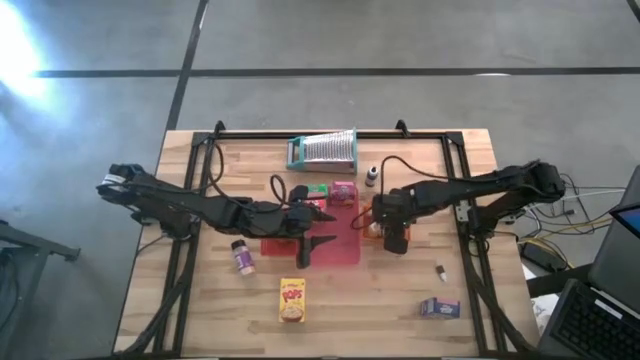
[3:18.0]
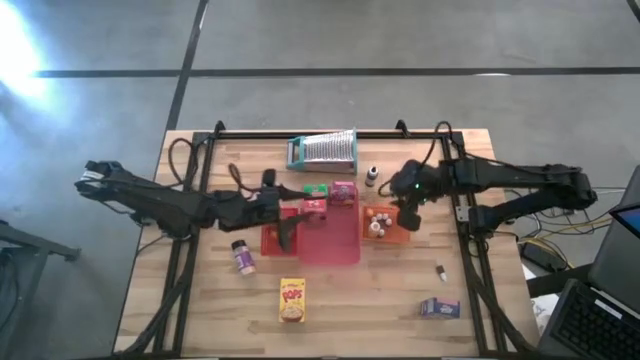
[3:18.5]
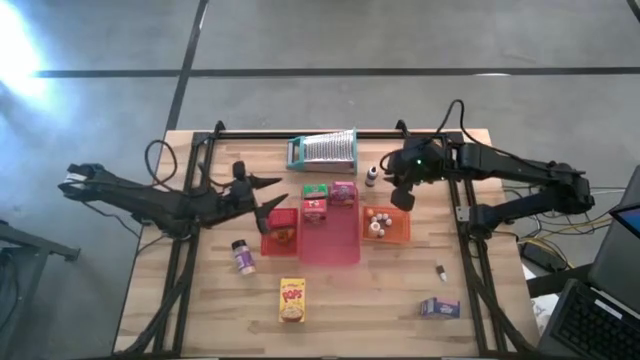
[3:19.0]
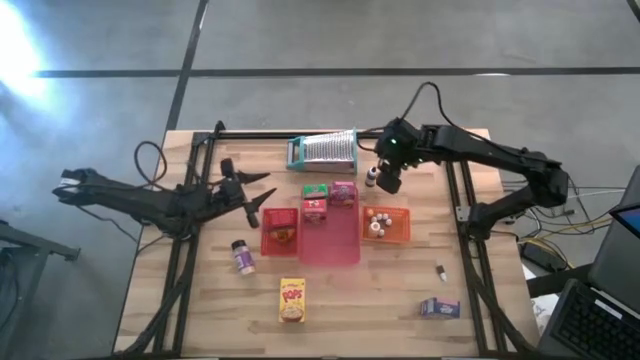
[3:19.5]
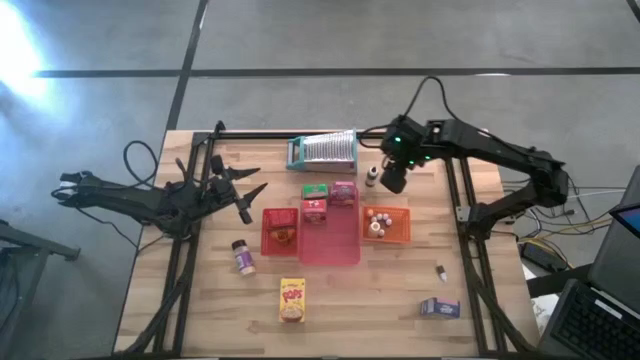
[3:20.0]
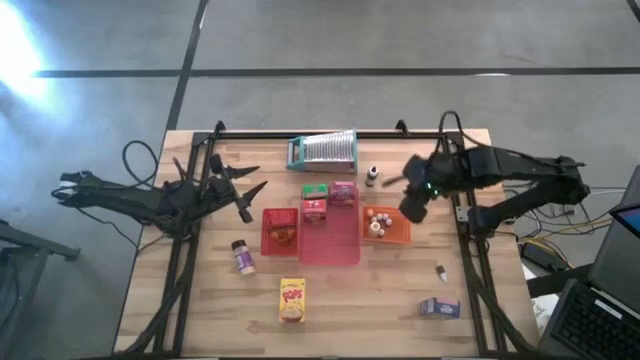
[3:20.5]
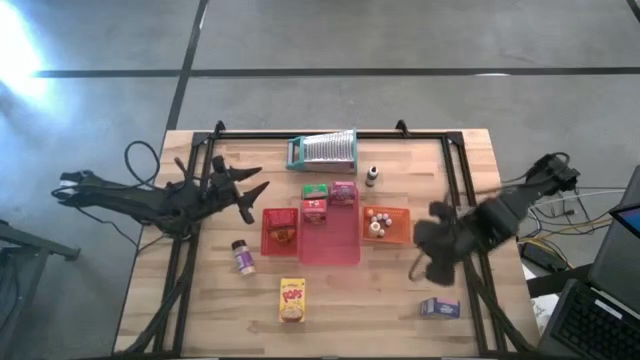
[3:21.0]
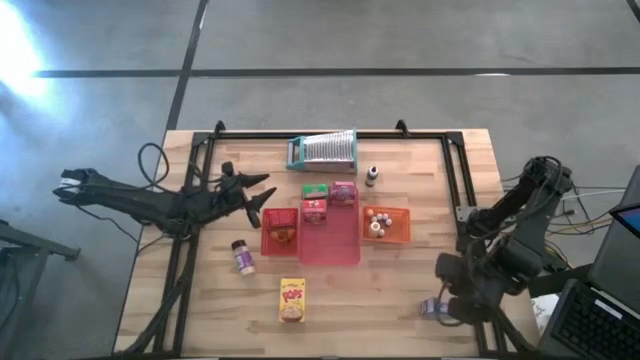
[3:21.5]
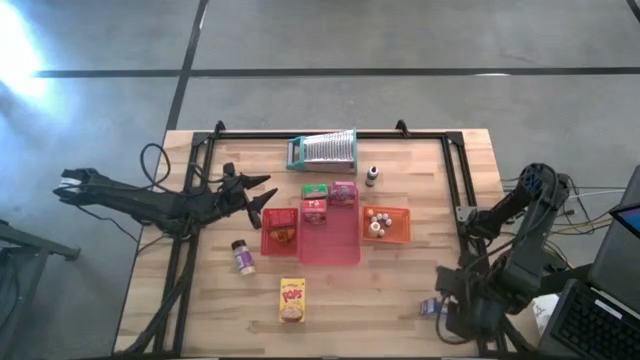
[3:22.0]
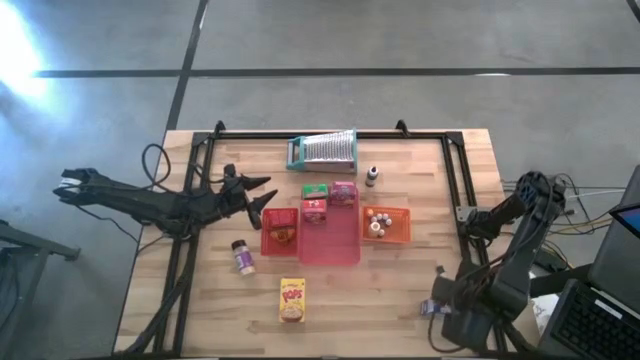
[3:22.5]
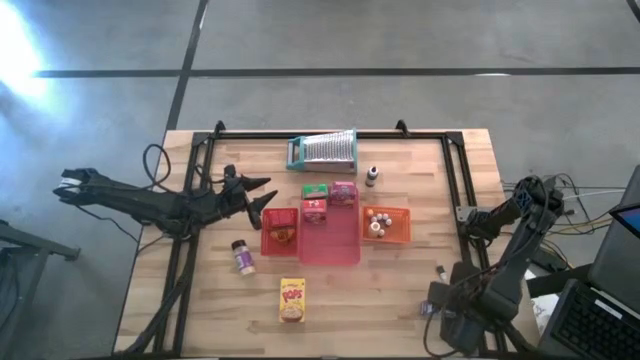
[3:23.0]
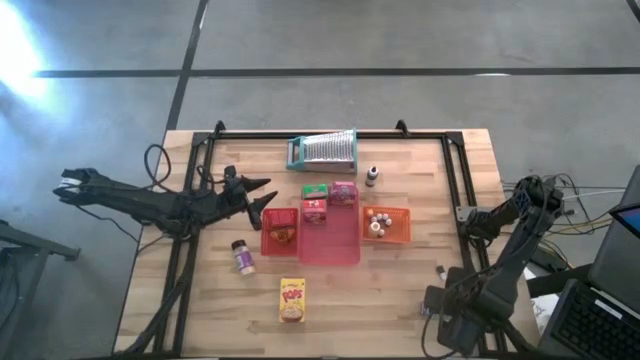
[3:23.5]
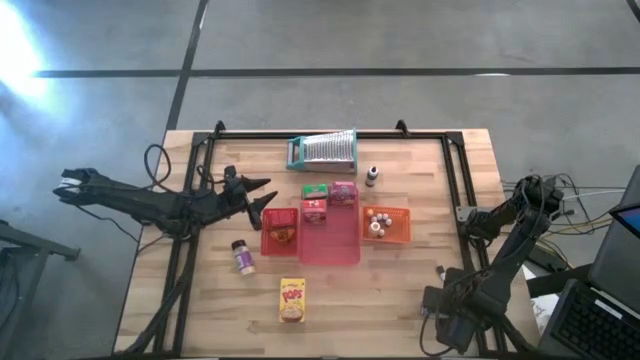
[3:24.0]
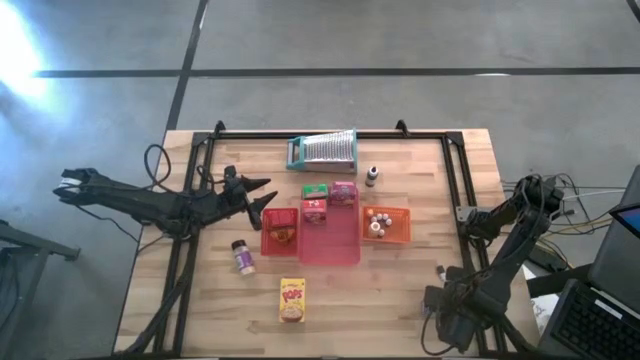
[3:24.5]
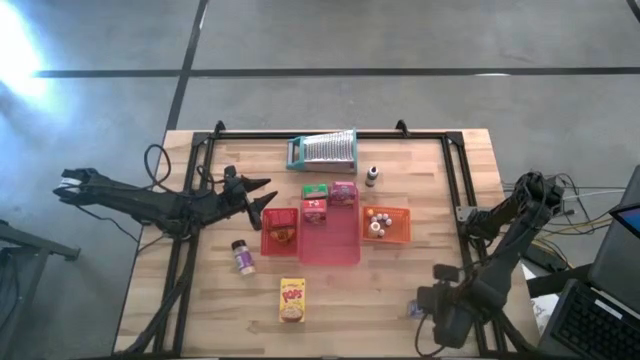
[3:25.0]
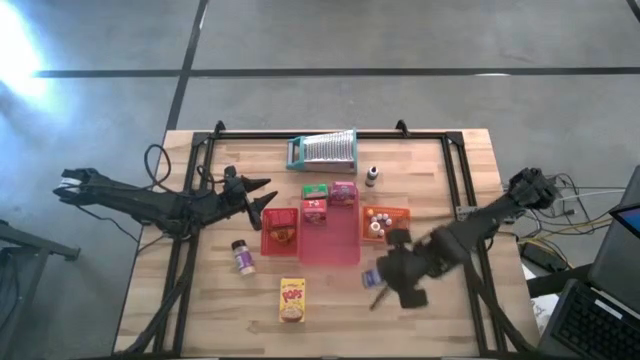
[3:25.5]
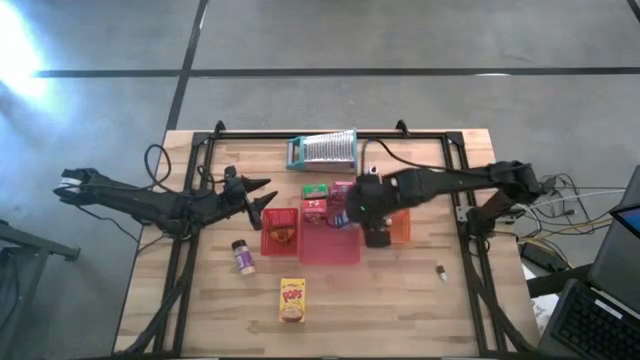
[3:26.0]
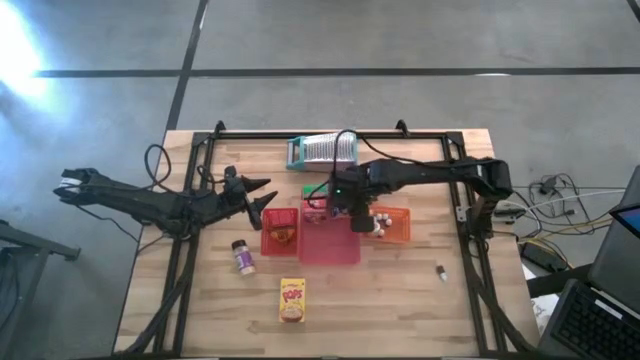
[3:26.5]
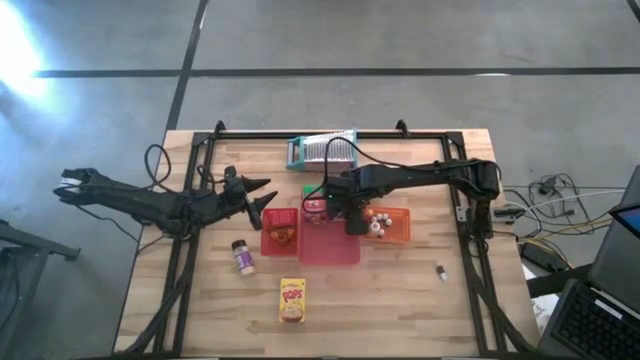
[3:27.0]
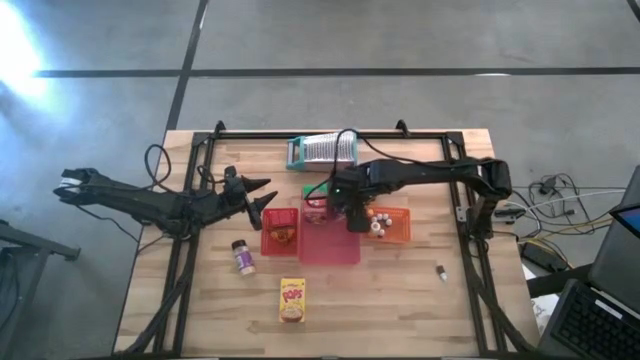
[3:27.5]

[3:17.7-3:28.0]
Task: Pick & Place Kitchen Items
Put the blue cereal box into the pink bin

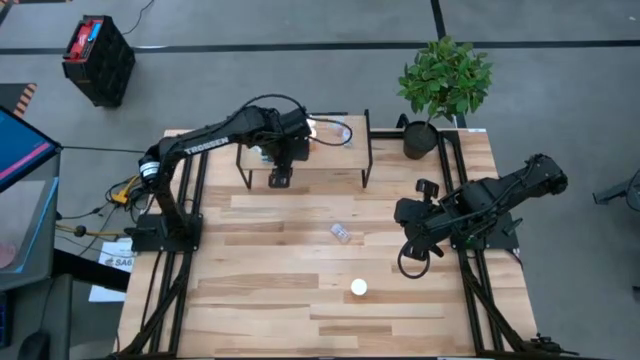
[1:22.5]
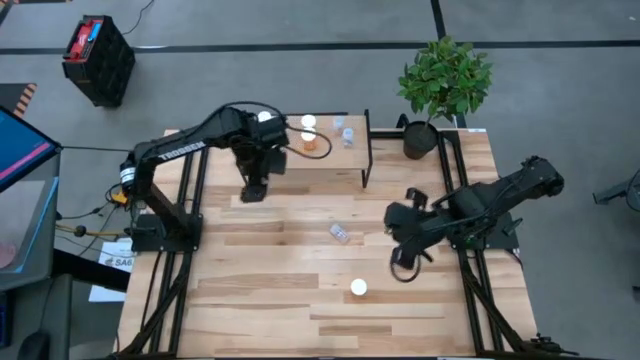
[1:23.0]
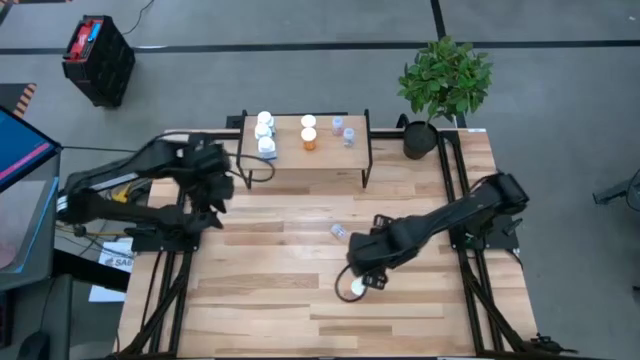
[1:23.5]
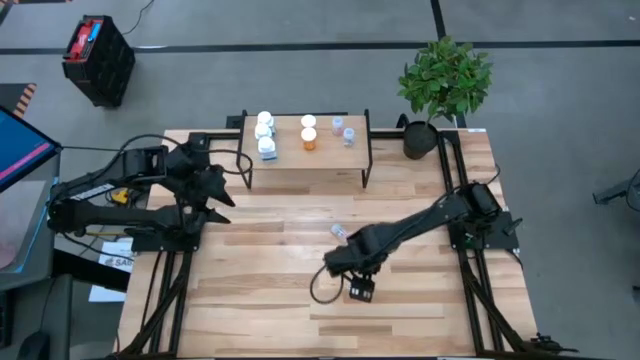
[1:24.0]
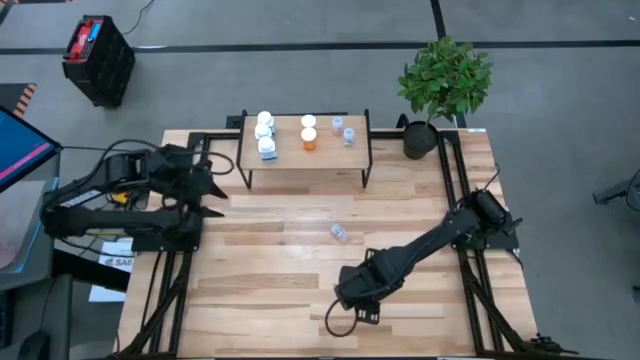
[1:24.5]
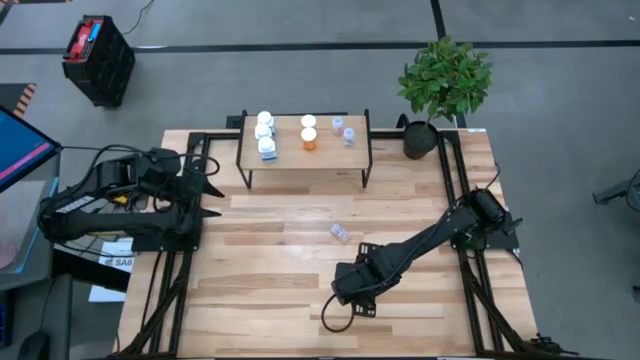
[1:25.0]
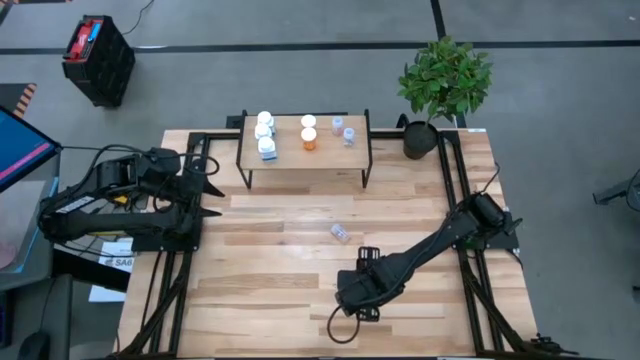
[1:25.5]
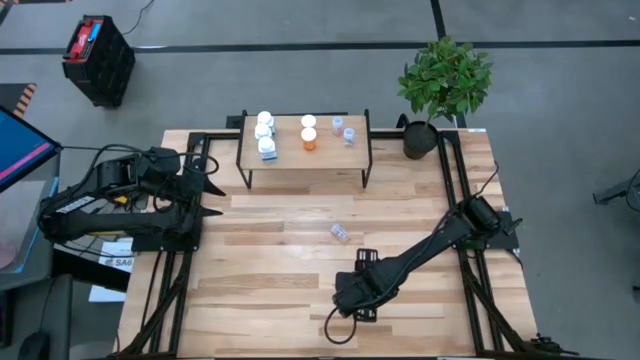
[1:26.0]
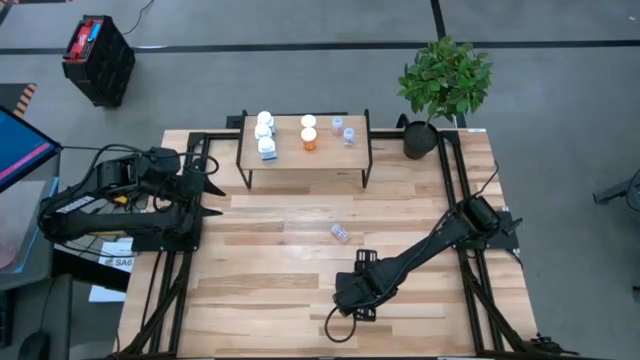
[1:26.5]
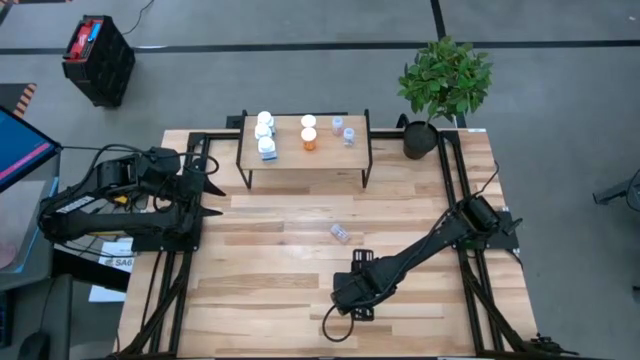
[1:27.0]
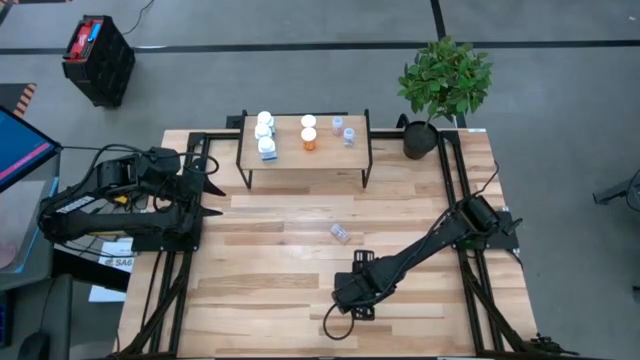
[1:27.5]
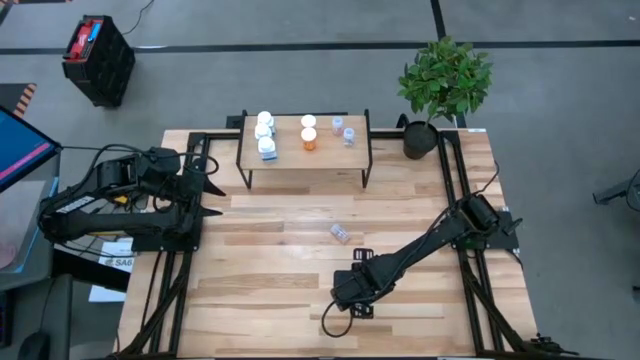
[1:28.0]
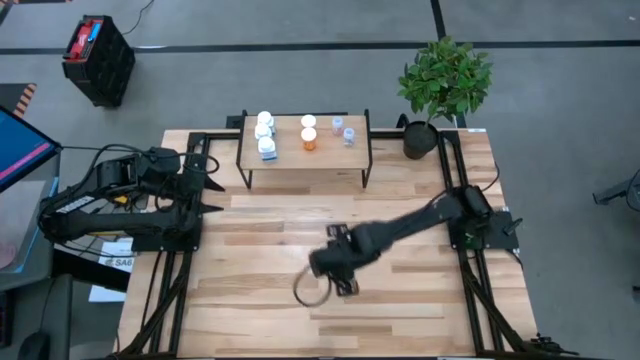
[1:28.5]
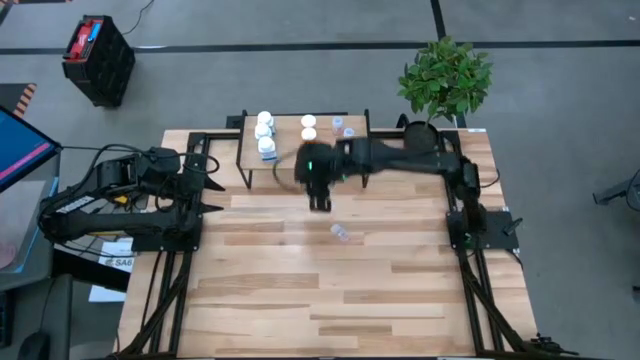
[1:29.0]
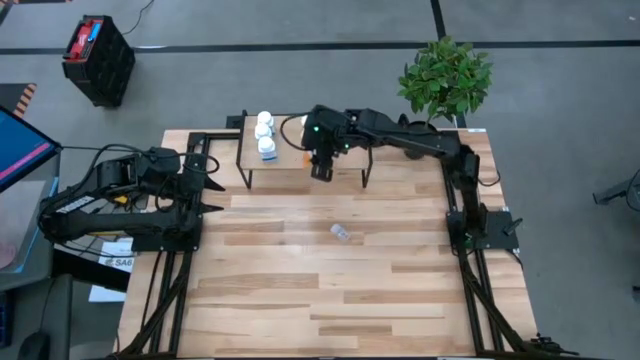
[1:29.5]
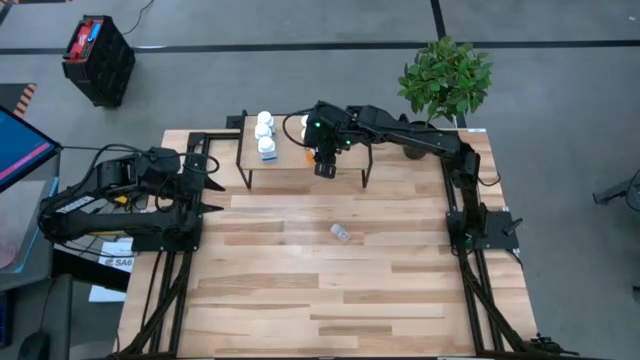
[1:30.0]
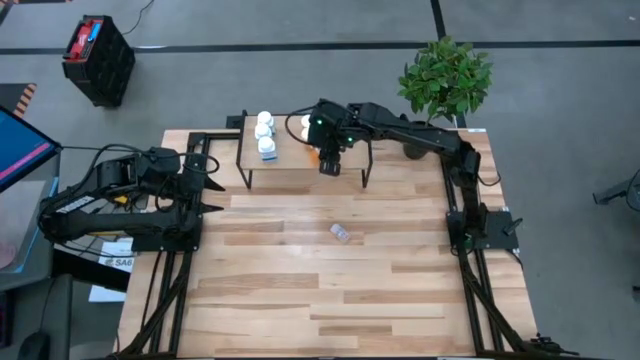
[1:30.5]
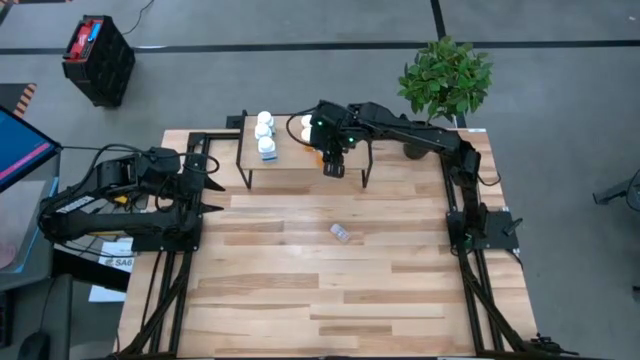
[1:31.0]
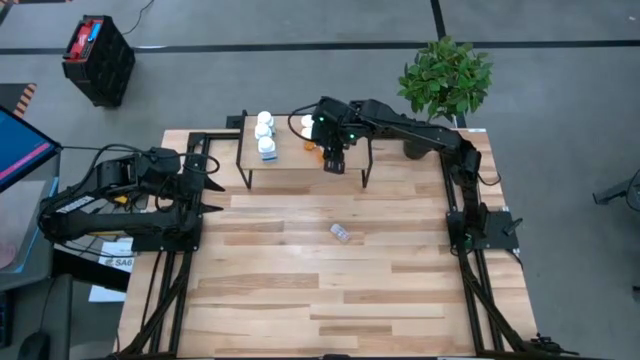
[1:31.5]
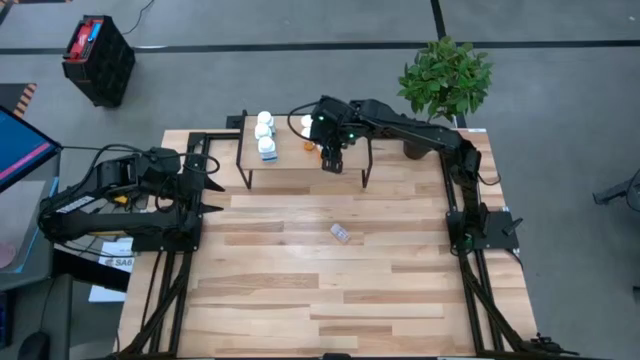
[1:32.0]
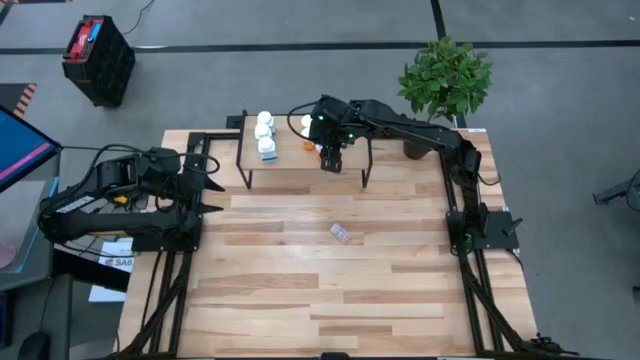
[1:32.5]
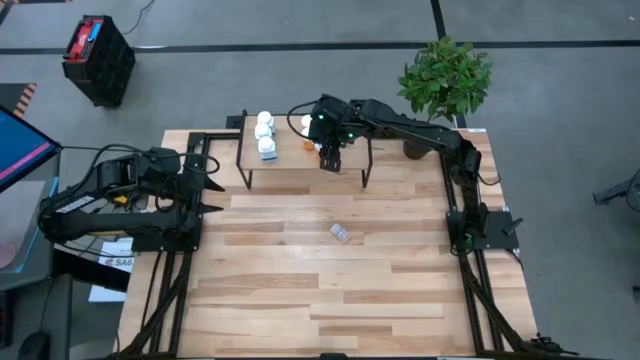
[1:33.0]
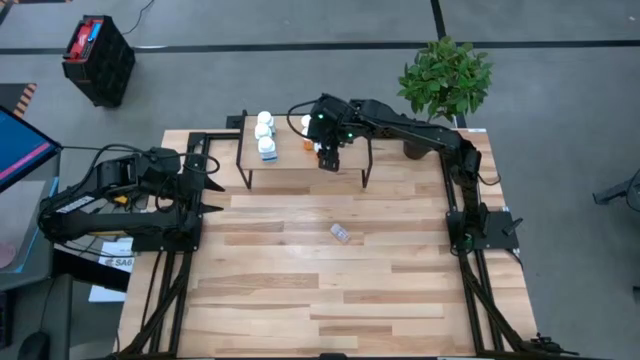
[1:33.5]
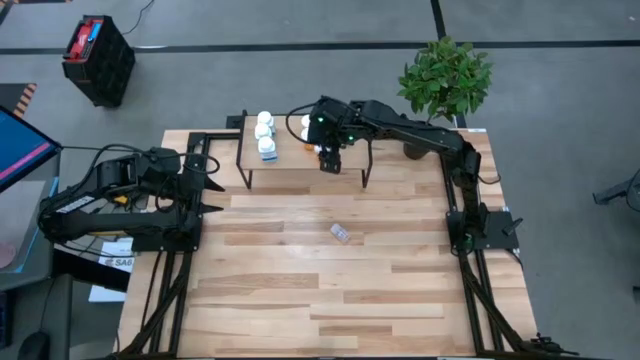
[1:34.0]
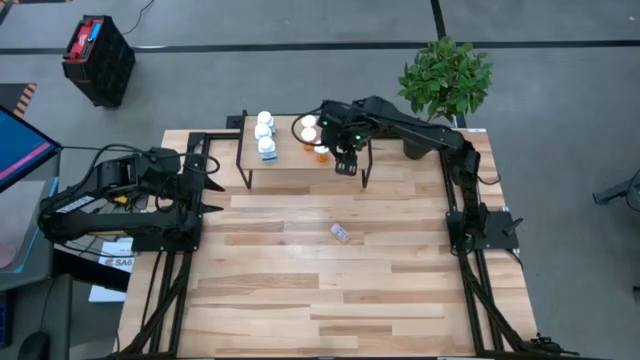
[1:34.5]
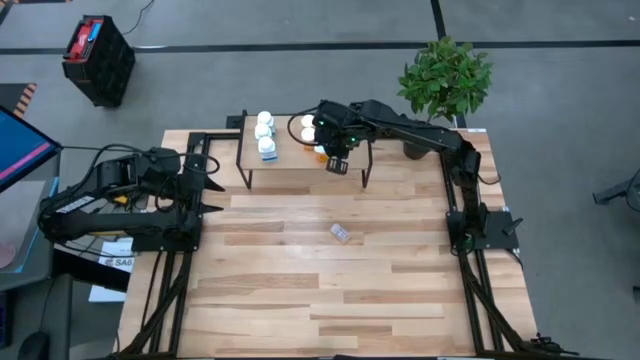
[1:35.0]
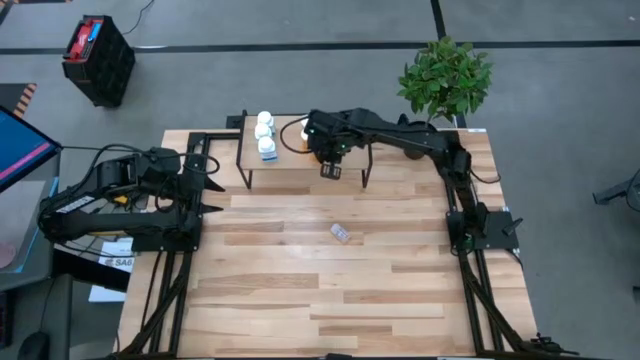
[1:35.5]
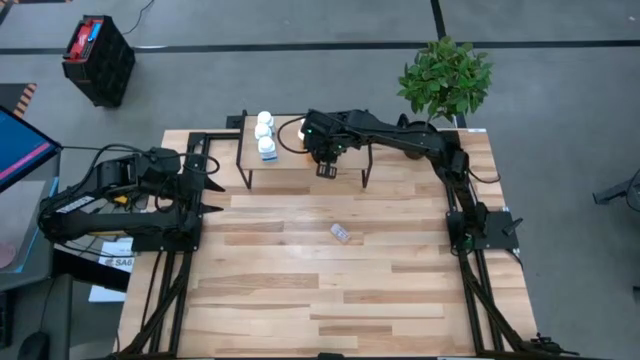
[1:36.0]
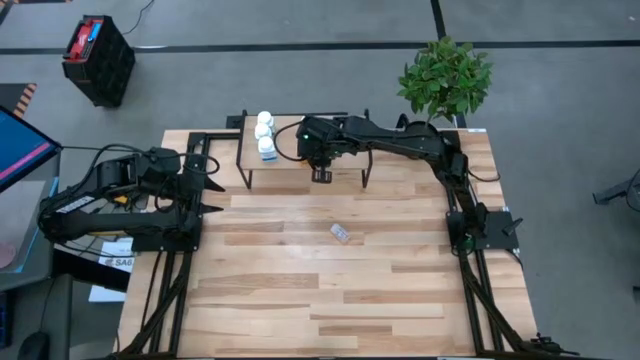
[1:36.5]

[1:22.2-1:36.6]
Task: Pick and place medicine bottles onto shelf by color
Put the orange pill bottle on the shelf aligned with the other orange pill bottles
